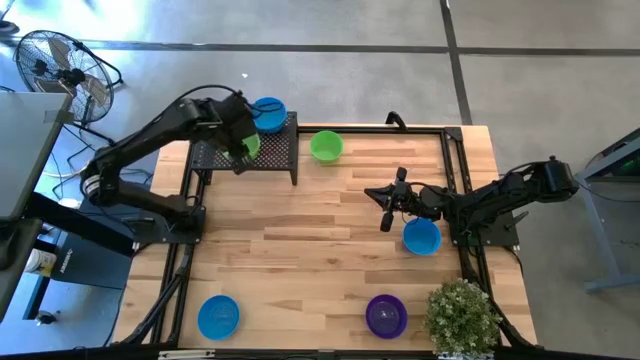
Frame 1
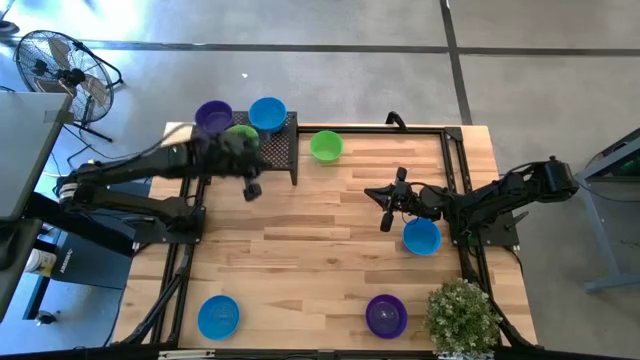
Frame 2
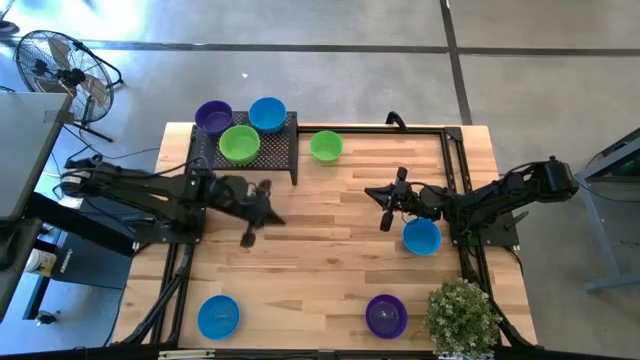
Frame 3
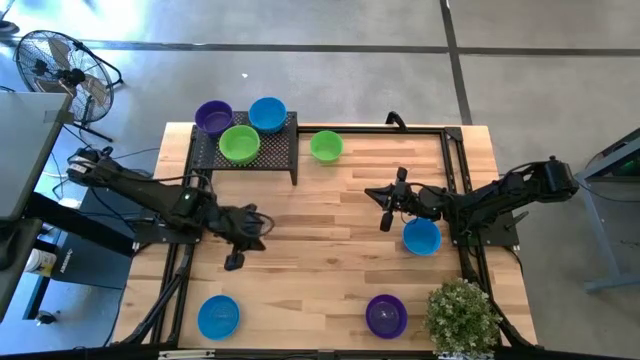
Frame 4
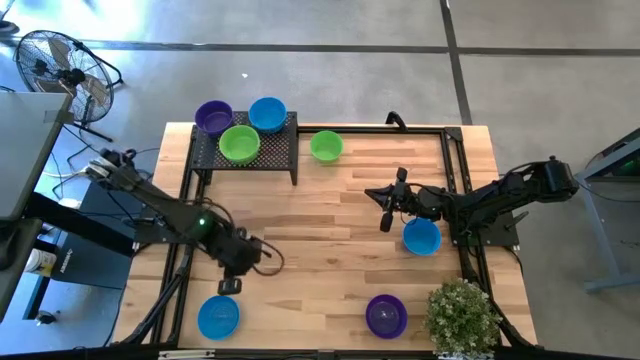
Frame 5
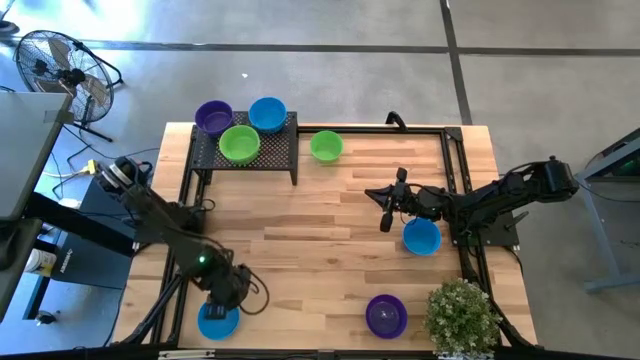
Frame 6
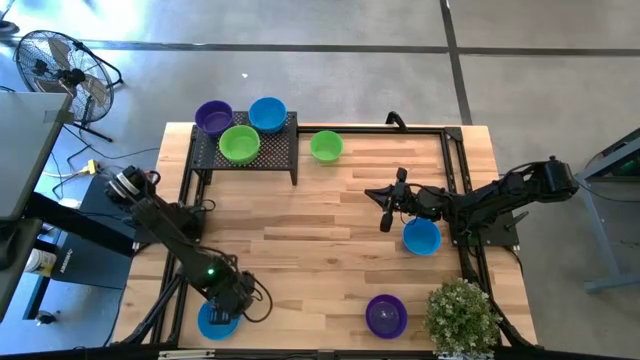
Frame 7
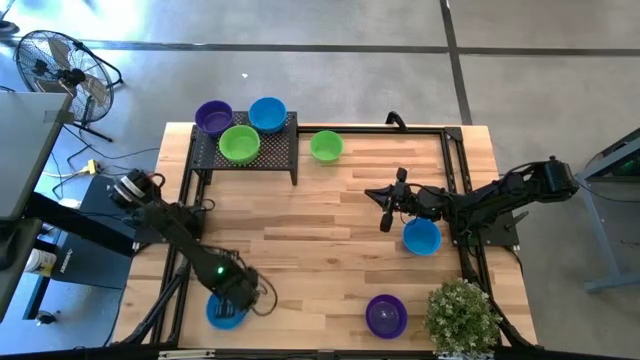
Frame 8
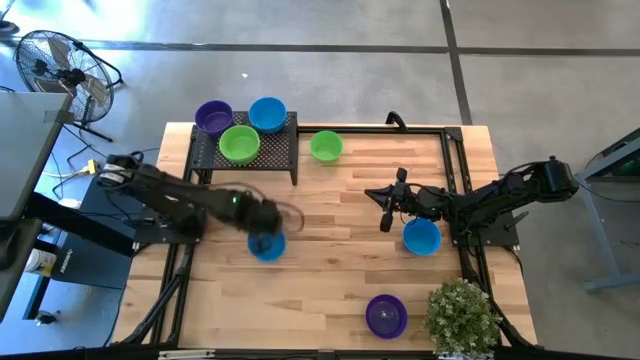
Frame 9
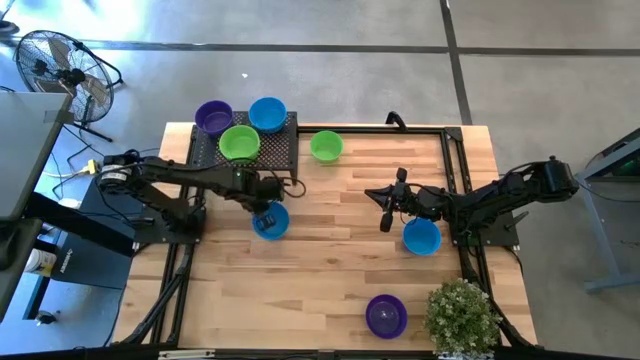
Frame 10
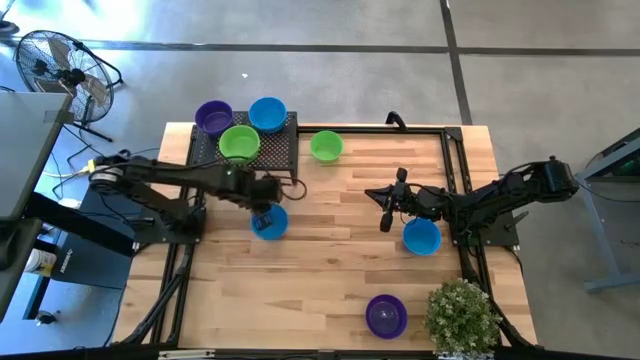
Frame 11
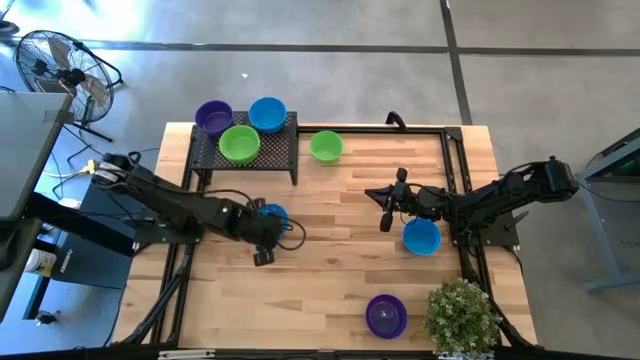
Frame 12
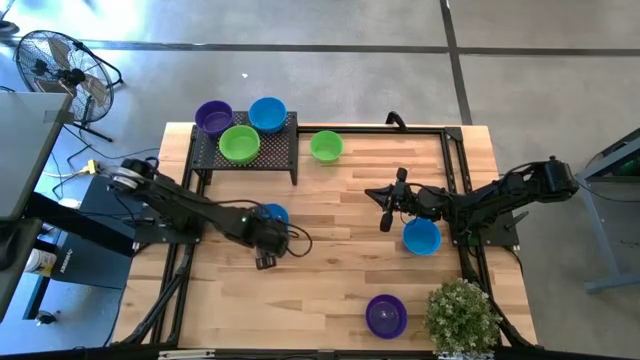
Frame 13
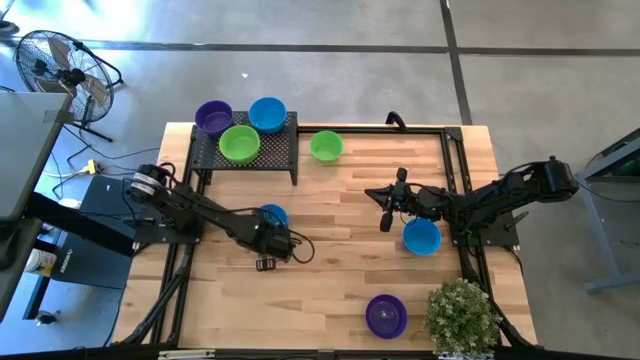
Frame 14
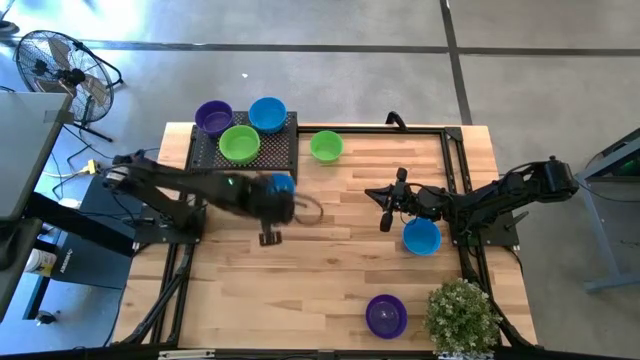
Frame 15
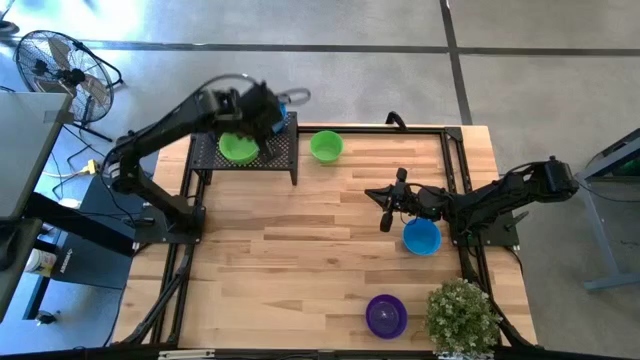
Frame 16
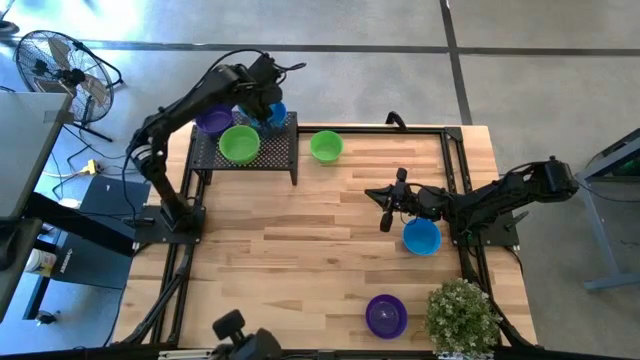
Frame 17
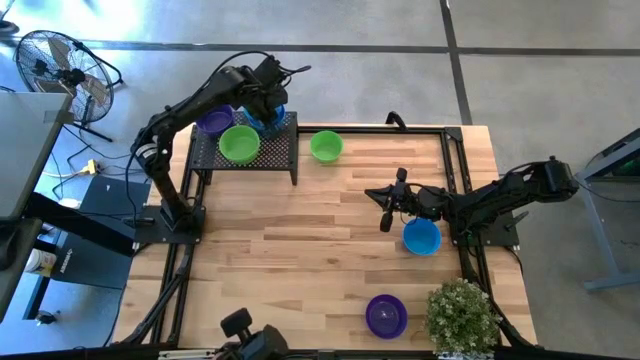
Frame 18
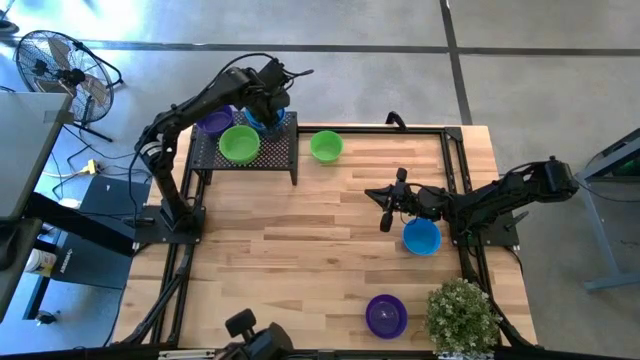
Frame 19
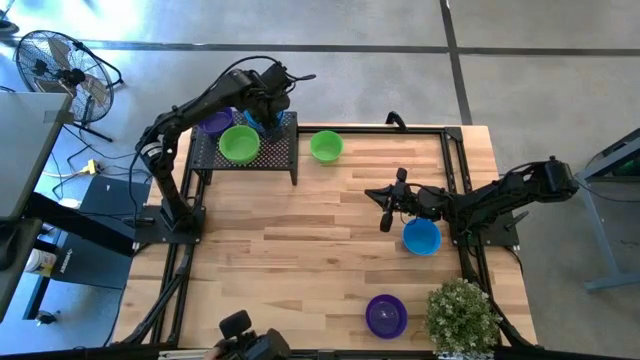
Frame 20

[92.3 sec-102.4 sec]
Task: Pick & Place Mini bowls
Stack the blue bowl on top of the blue bowl on the shelf

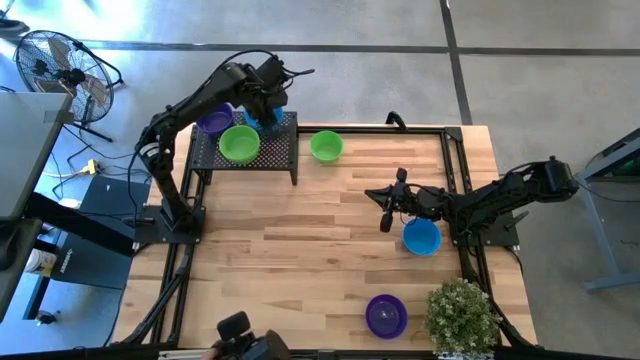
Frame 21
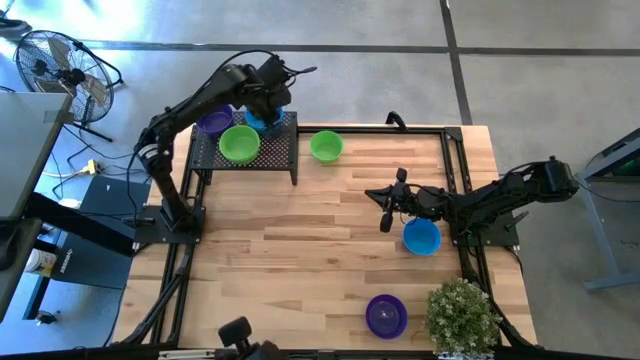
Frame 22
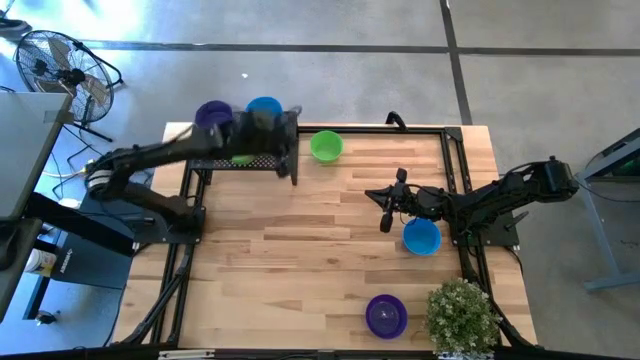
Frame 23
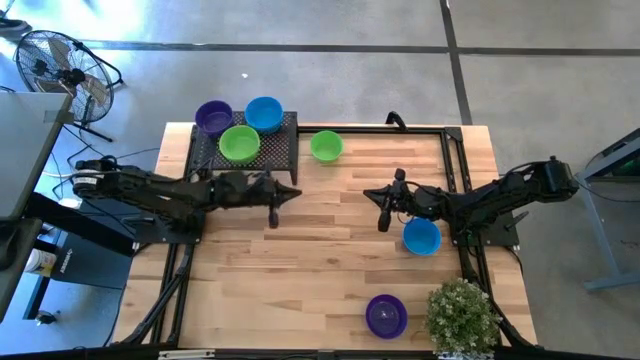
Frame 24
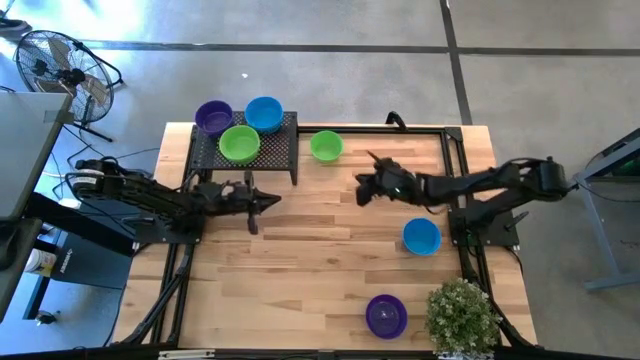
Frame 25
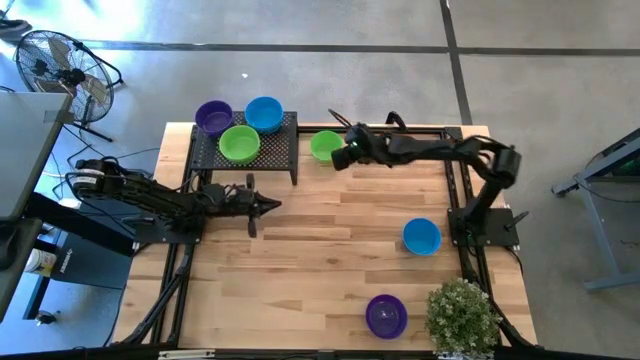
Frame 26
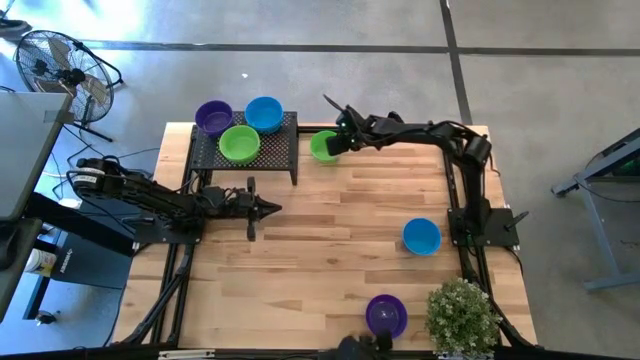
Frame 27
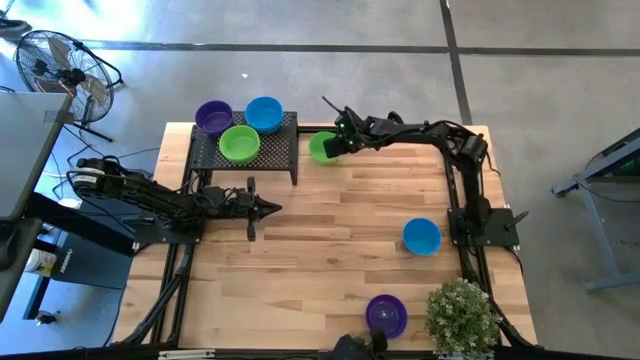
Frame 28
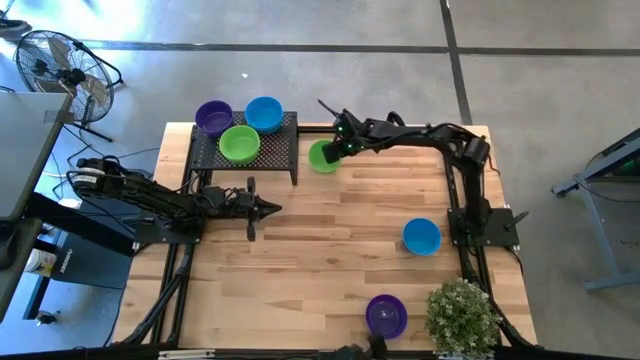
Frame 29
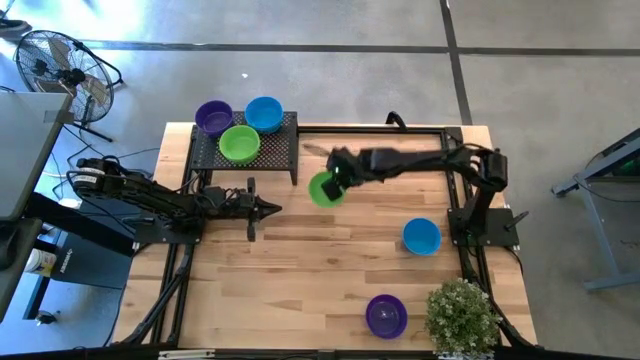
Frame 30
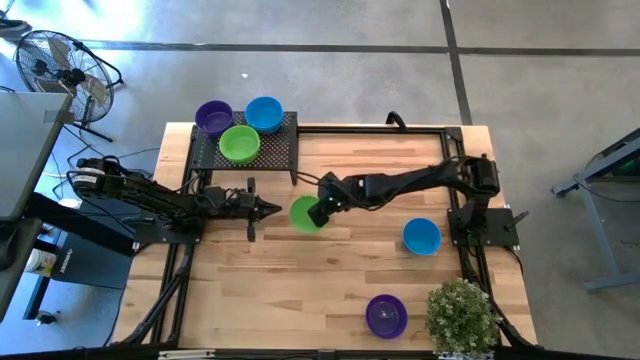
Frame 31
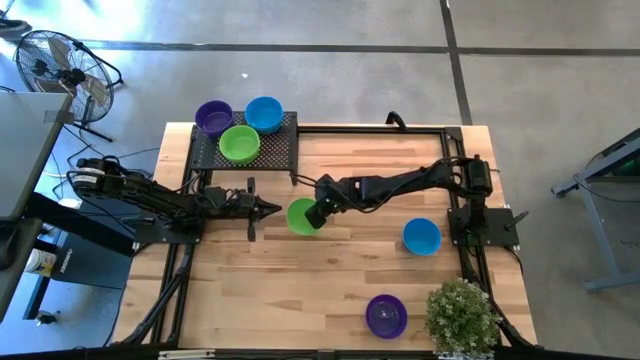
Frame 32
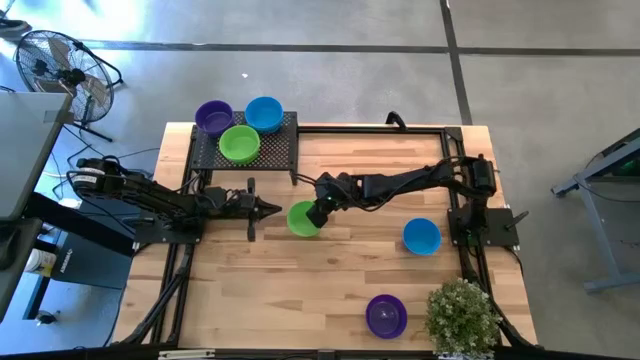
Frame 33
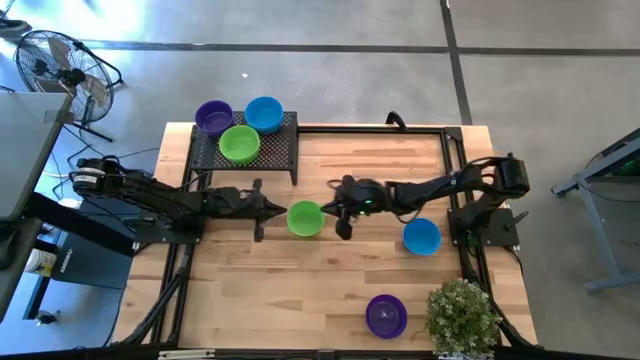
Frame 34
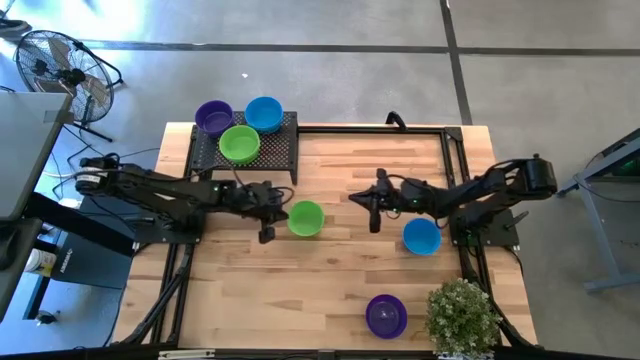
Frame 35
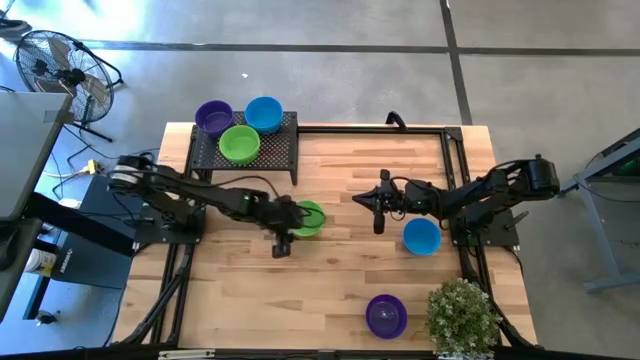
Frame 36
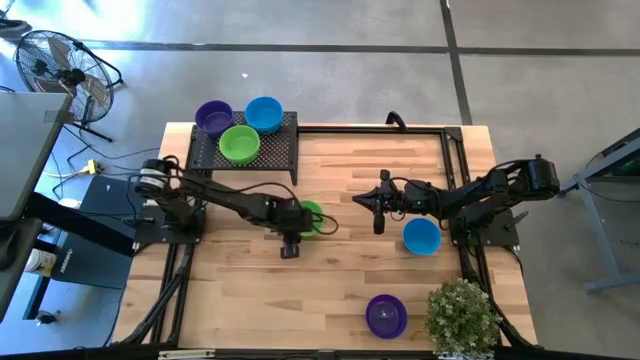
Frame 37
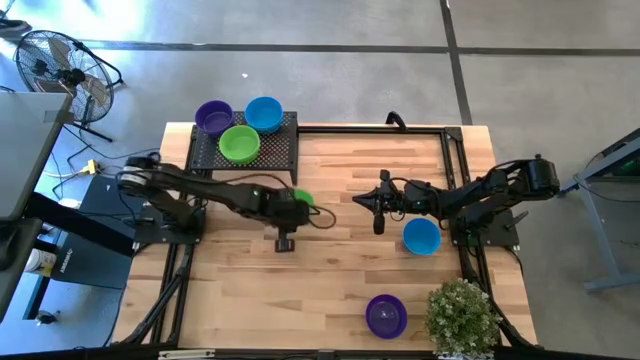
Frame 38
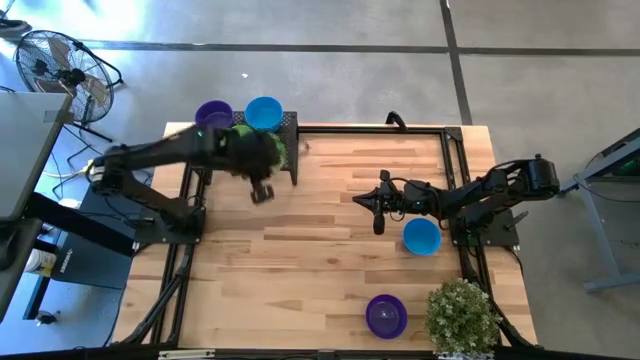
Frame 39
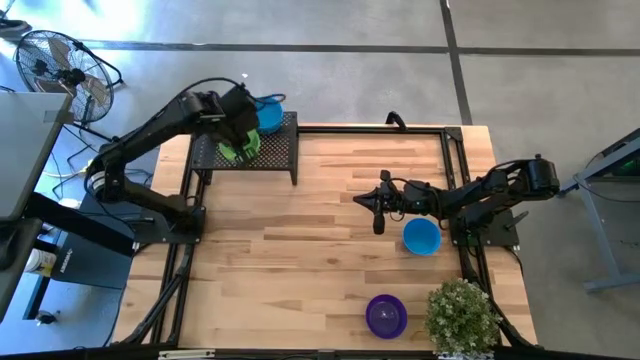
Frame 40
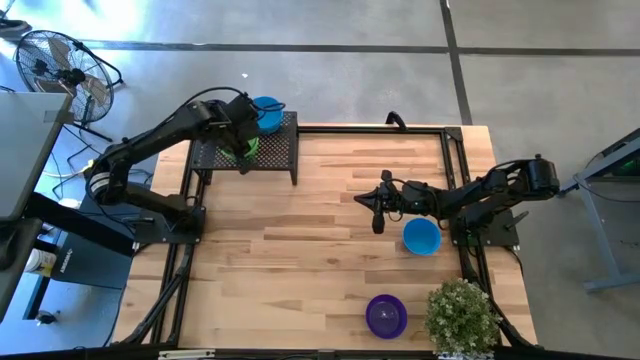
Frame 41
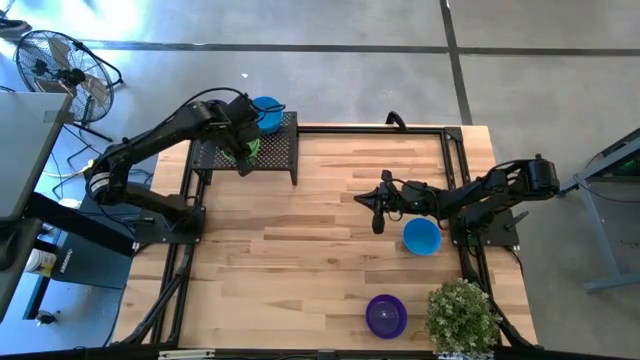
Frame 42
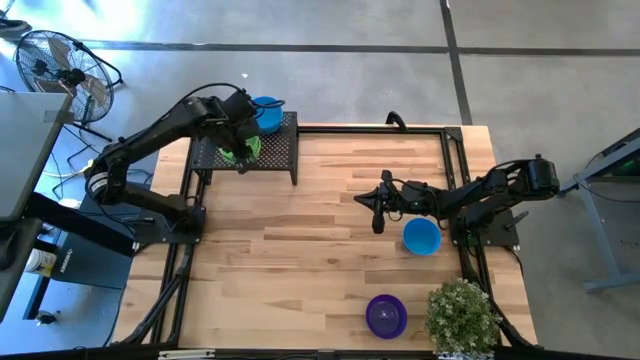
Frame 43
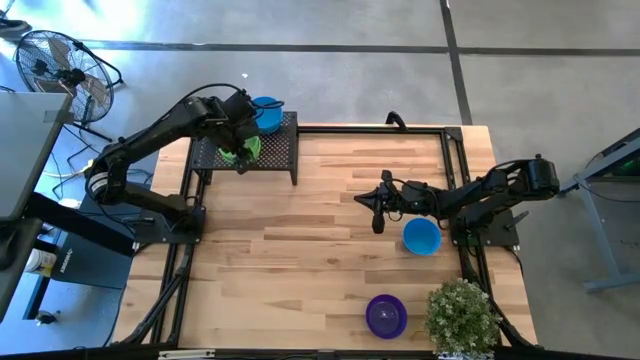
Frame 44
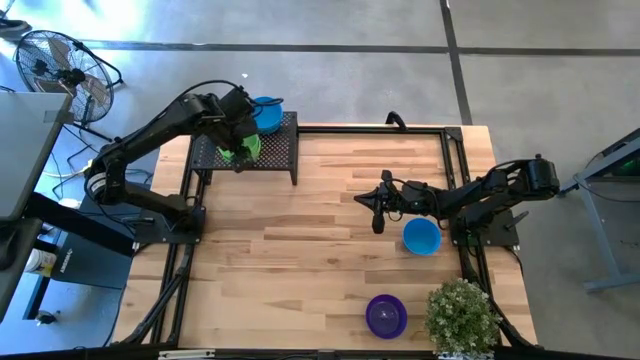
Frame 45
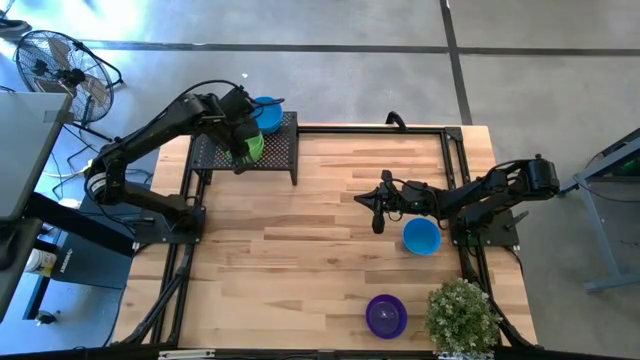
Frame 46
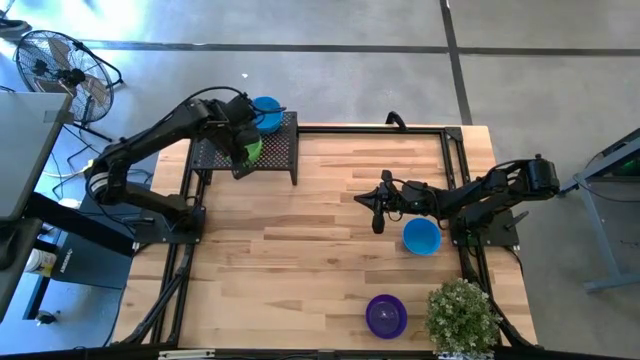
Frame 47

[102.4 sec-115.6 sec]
Stack the green bowl on top of the green bowl on the shelf
